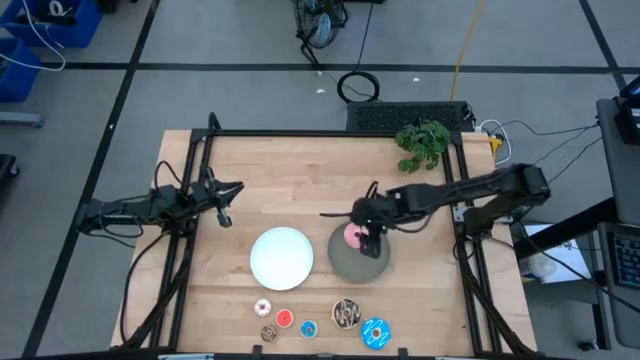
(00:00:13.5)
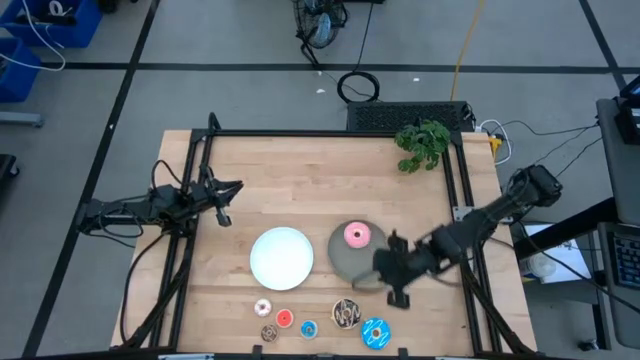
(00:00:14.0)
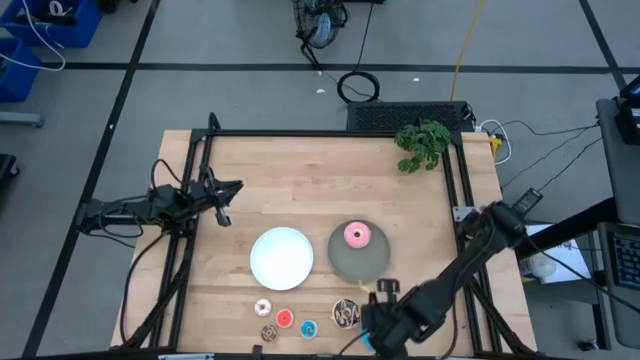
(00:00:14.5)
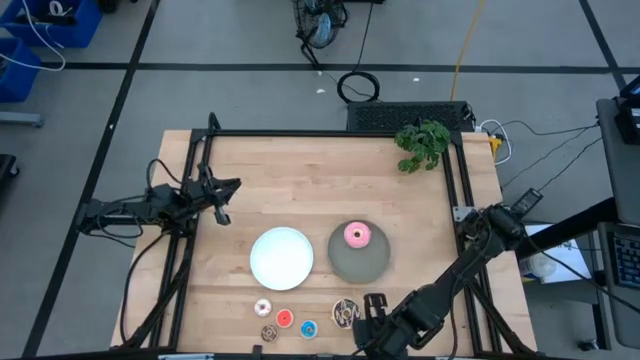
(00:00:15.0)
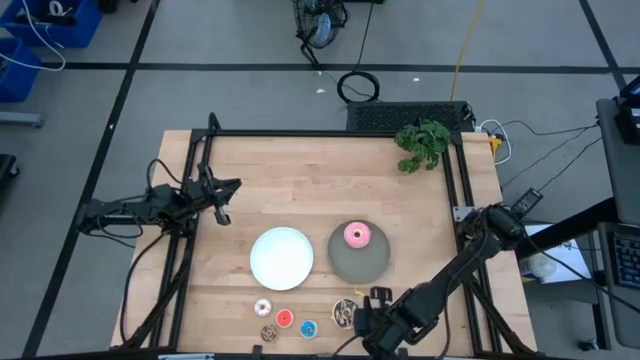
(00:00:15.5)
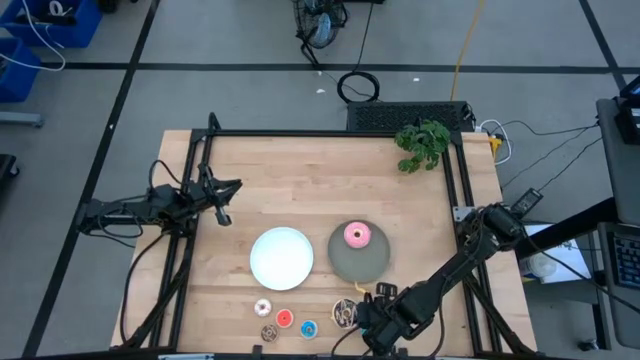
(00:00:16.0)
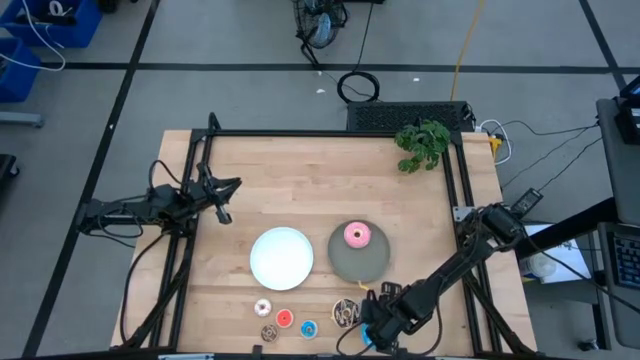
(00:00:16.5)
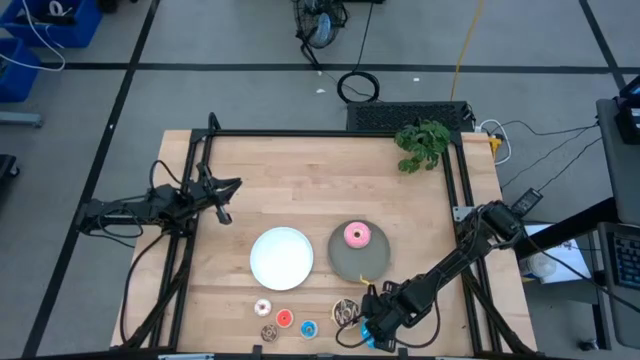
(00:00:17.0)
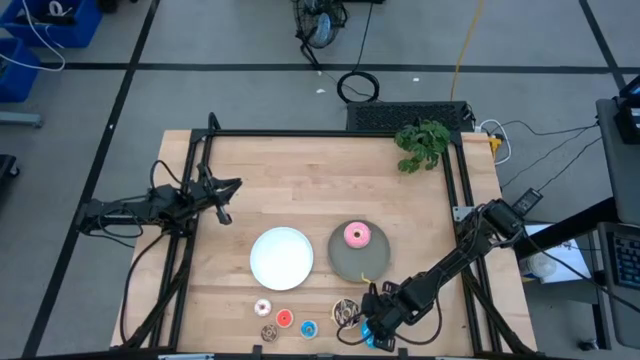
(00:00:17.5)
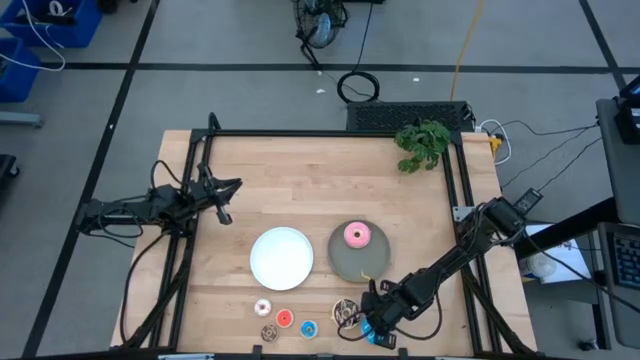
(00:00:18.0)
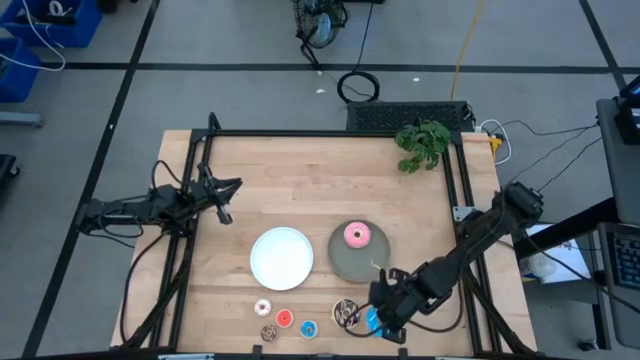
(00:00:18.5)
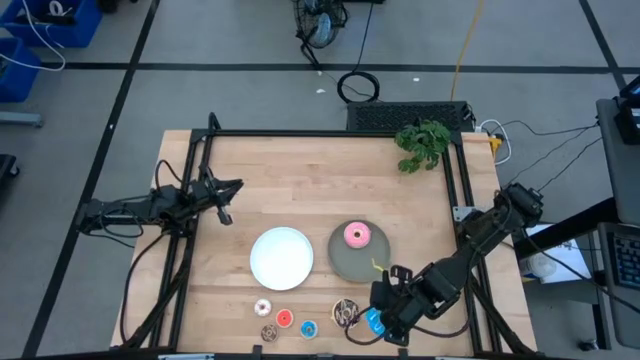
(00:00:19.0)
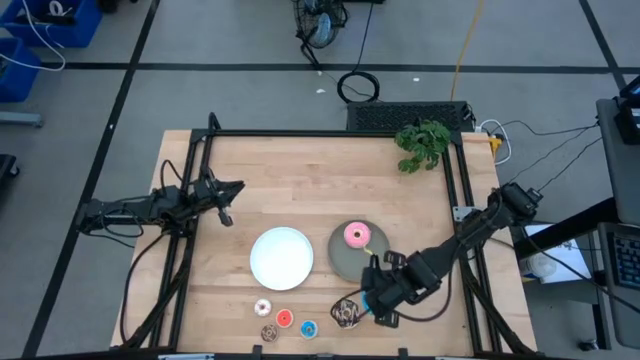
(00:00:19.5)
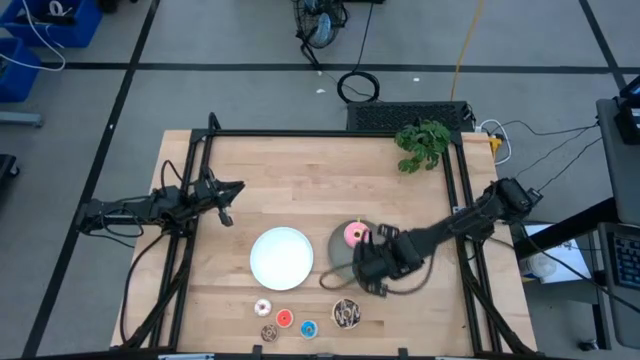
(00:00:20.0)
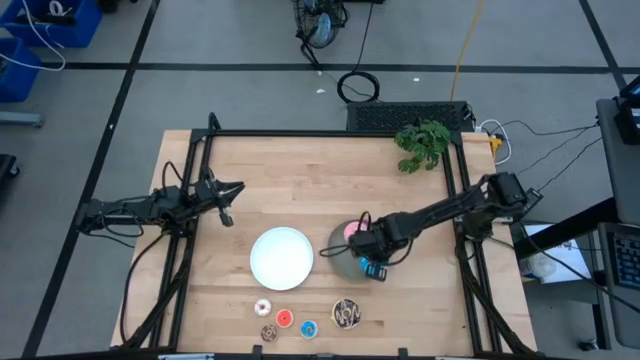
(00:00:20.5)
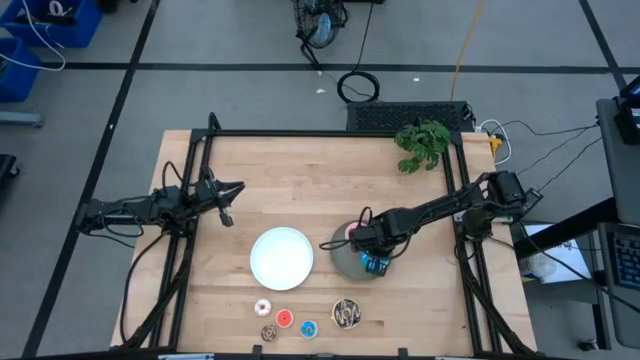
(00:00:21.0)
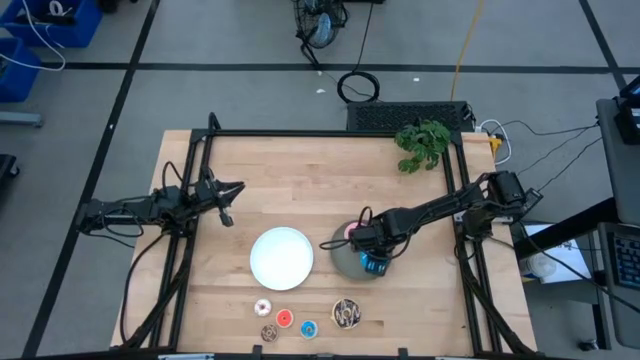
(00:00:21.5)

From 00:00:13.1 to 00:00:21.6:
Task: Pick & Place donuts
Put the large blue donut on the gray plate

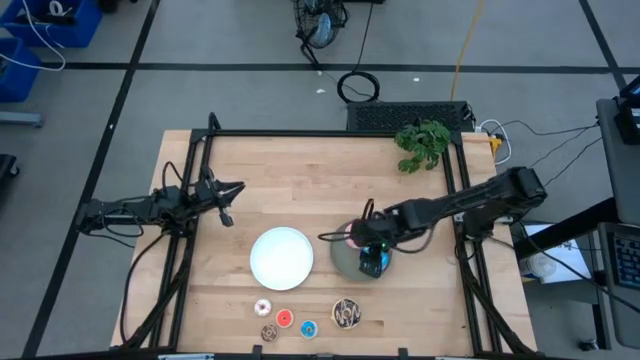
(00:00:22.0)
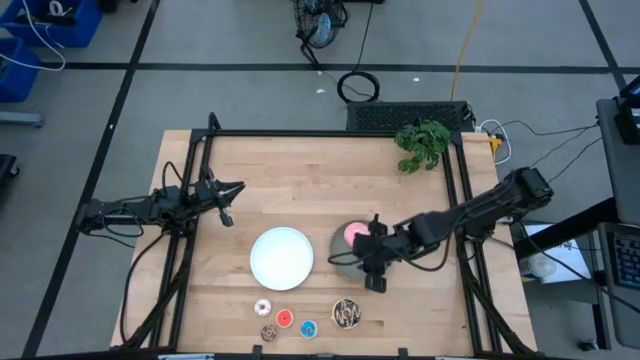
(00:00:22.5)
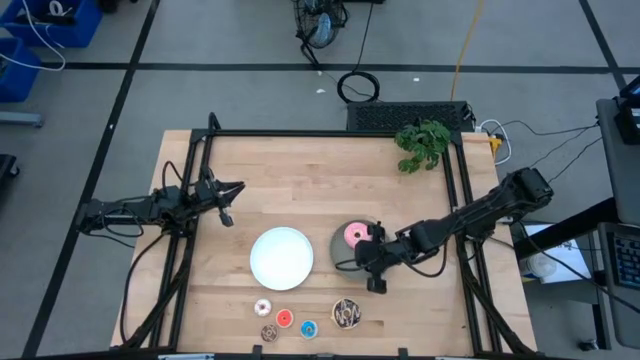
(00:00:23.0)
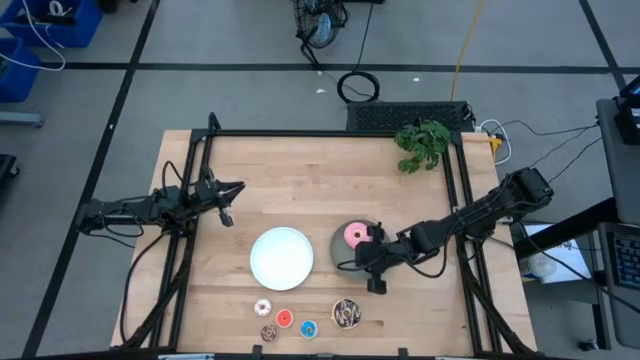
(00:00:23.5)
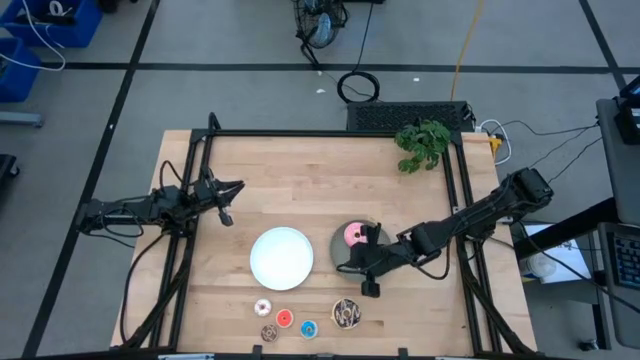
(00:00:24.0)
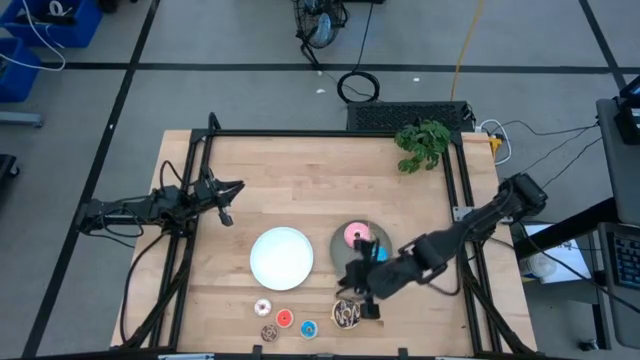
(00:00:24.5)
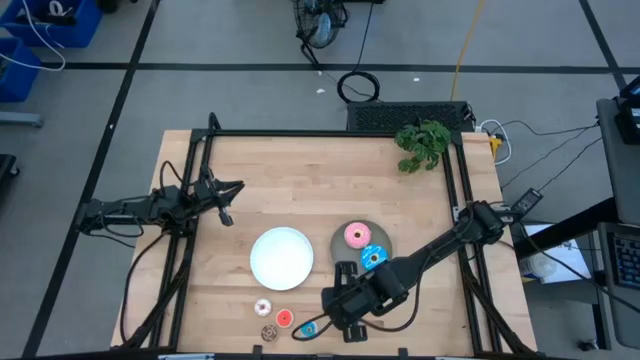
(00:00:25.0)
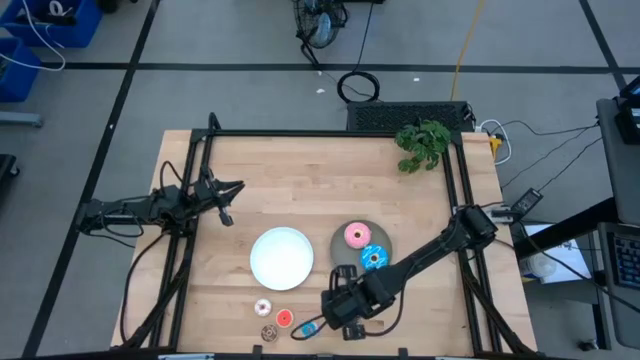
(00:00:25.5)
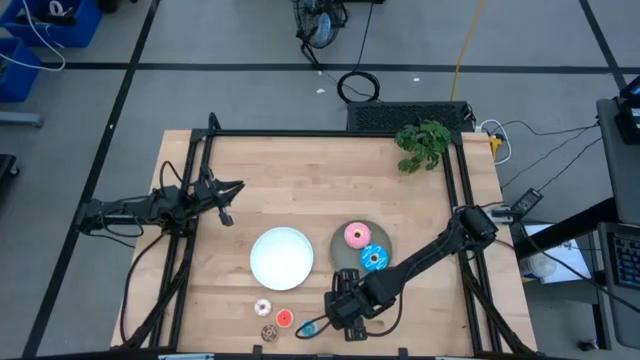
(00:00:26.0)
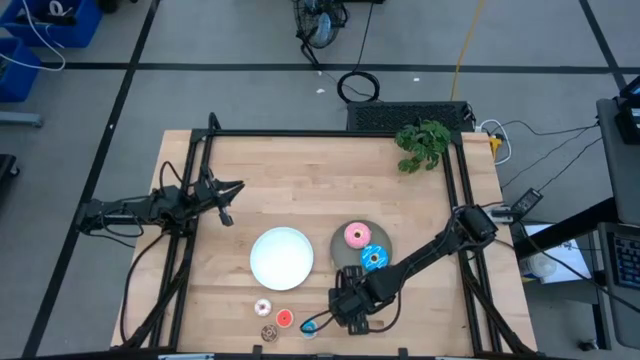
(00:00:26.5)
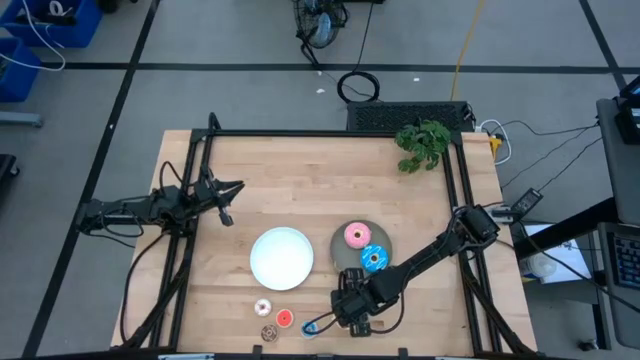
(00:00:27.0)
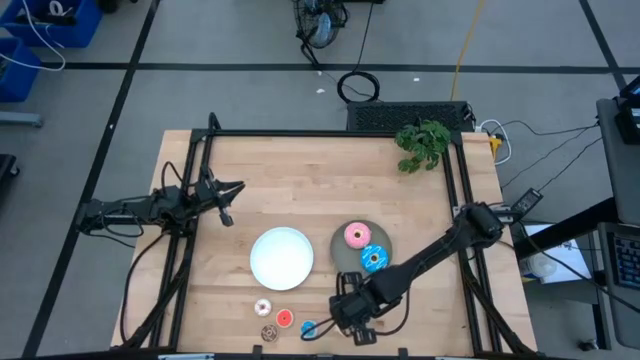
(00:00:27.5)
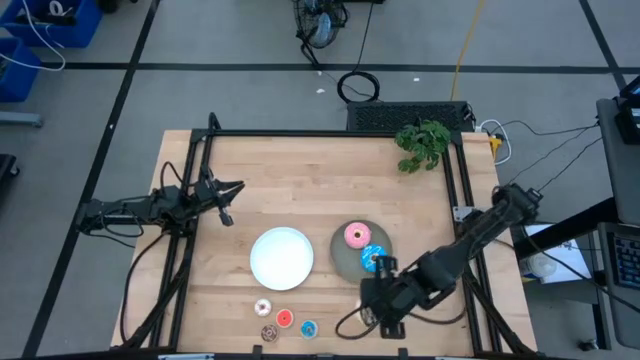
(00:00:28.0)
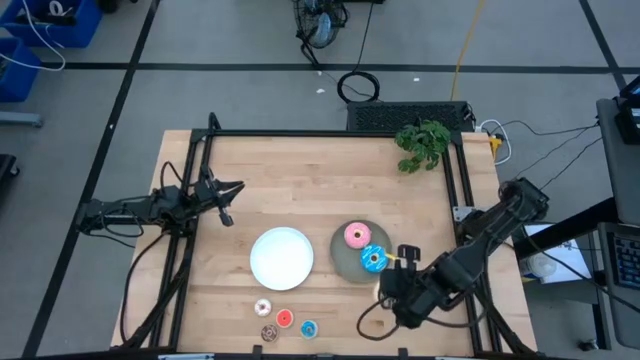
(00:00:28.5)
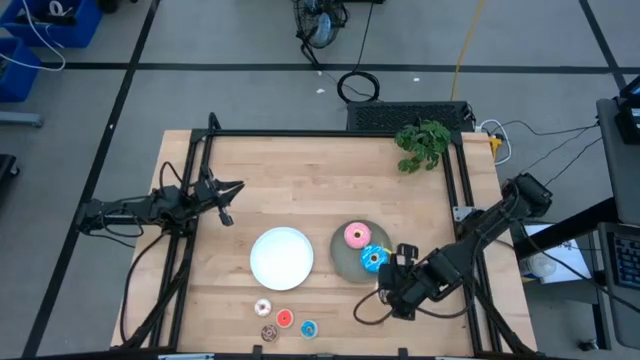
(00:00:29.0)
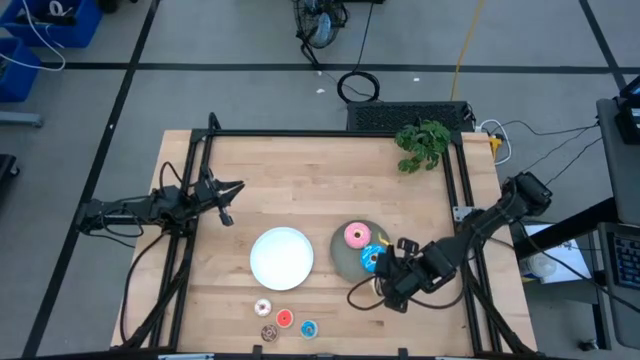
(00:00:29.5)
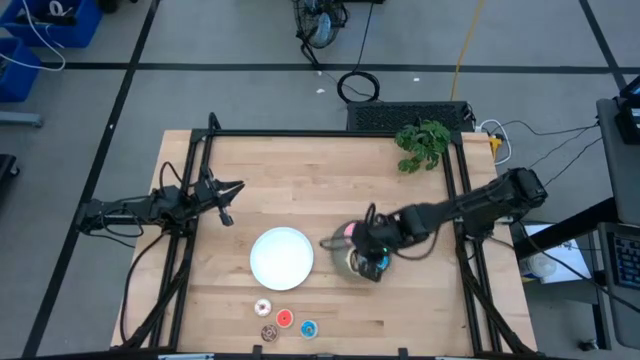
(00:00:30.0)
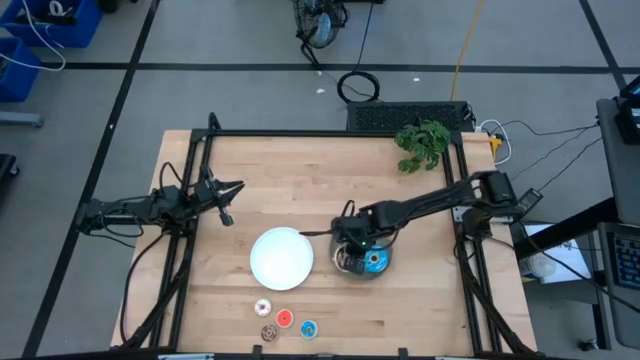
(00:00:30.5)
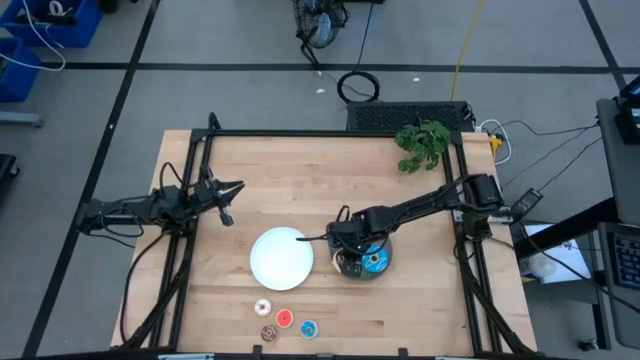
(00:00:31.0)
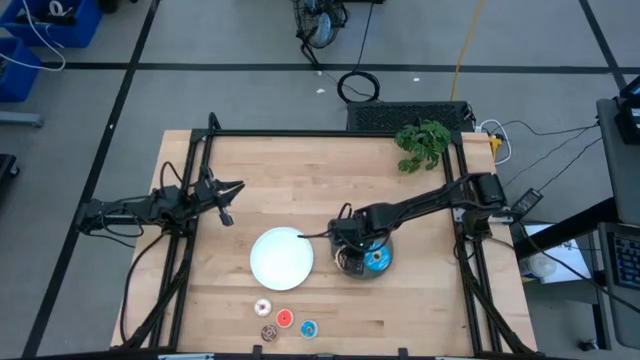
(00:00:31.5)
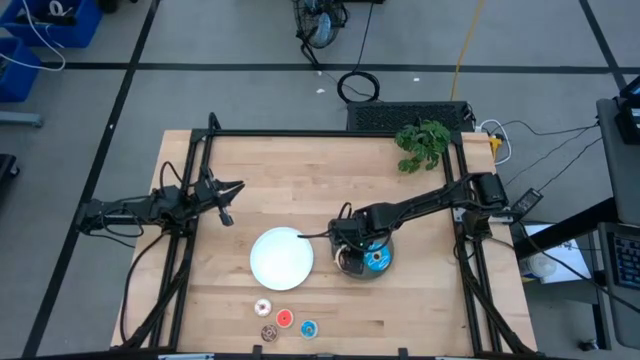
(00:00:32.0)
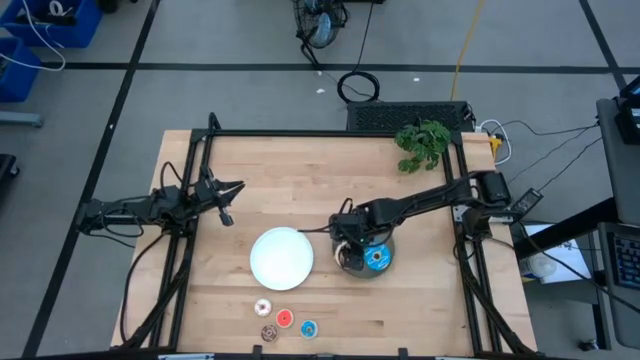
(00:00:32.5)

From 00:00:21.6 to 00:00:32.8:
Put the large black donut on the gray plate
